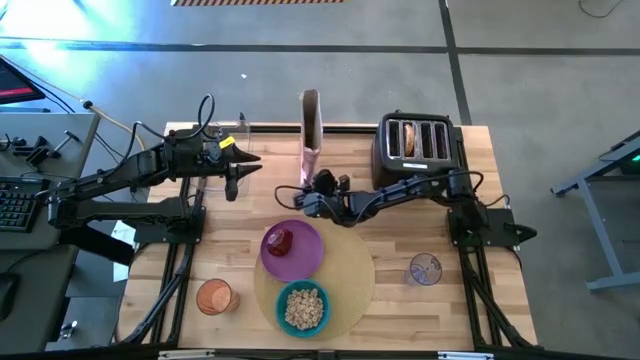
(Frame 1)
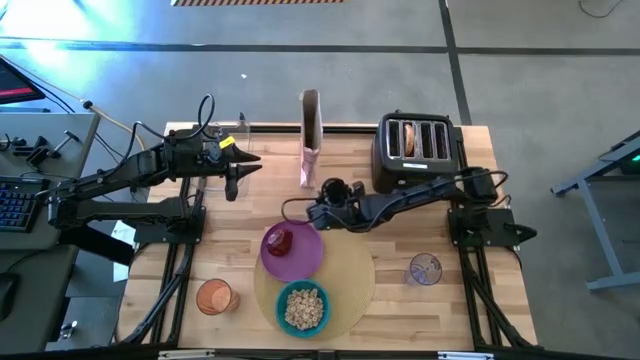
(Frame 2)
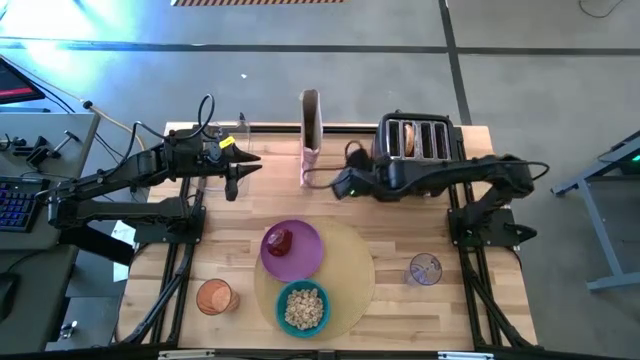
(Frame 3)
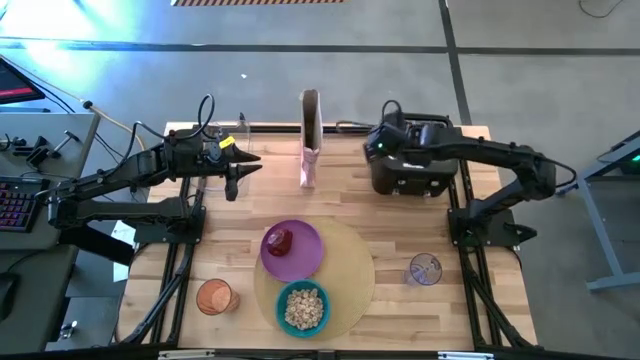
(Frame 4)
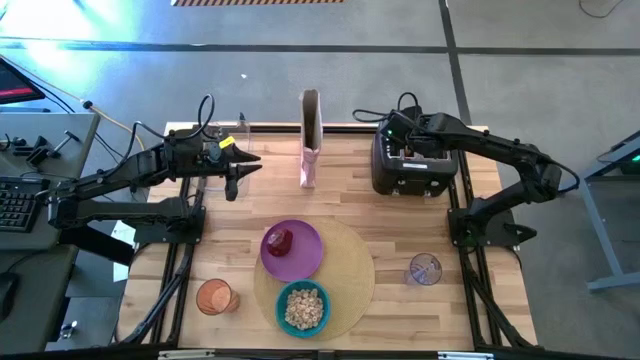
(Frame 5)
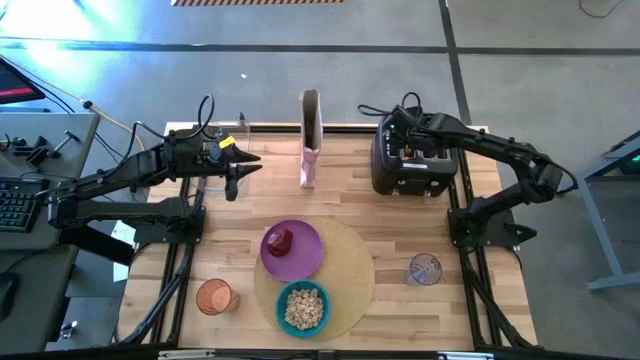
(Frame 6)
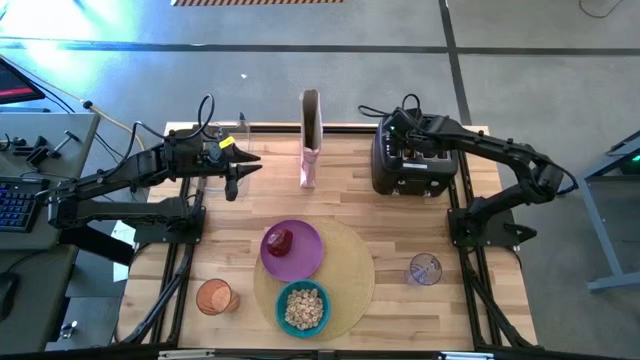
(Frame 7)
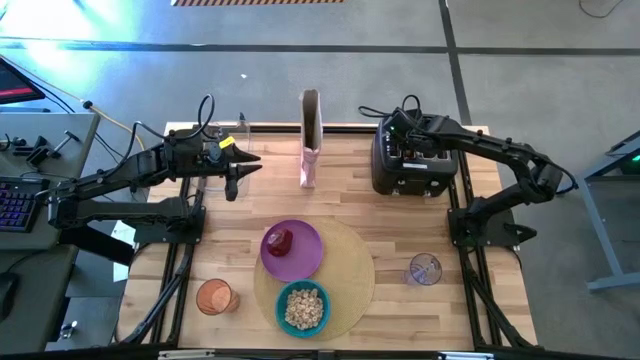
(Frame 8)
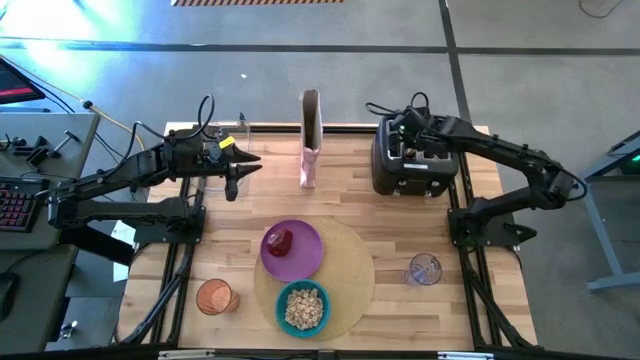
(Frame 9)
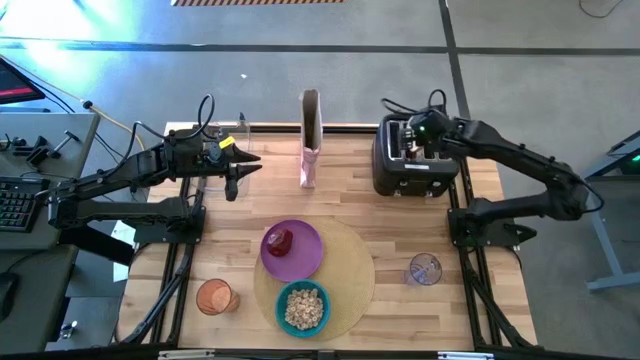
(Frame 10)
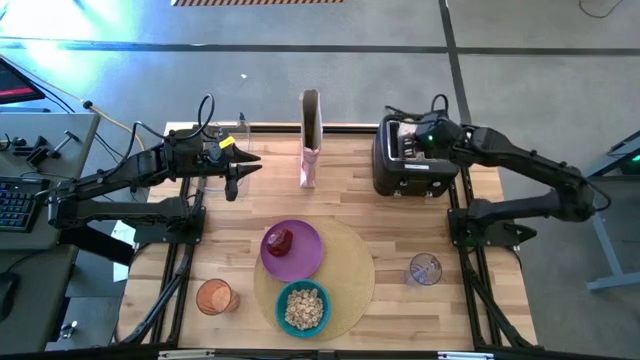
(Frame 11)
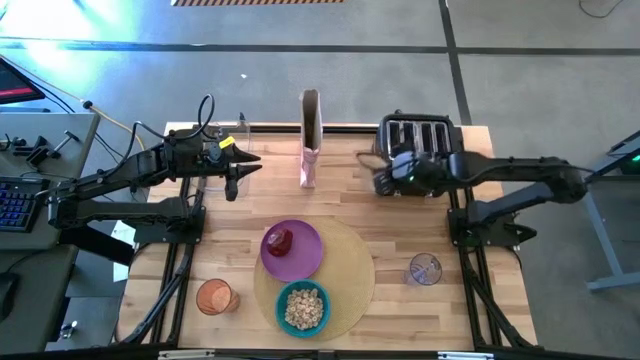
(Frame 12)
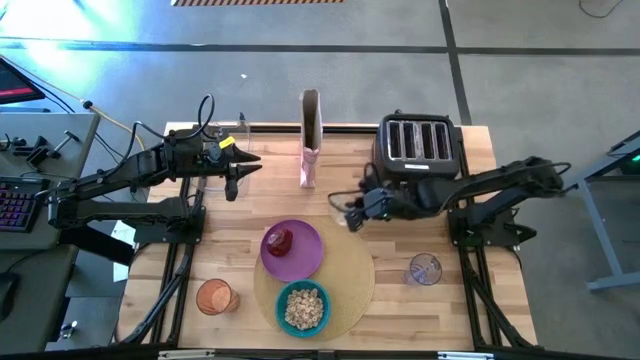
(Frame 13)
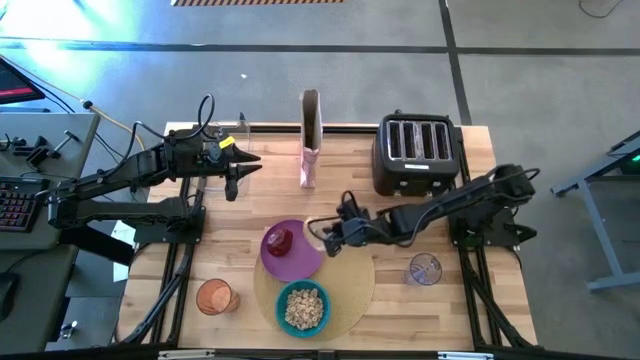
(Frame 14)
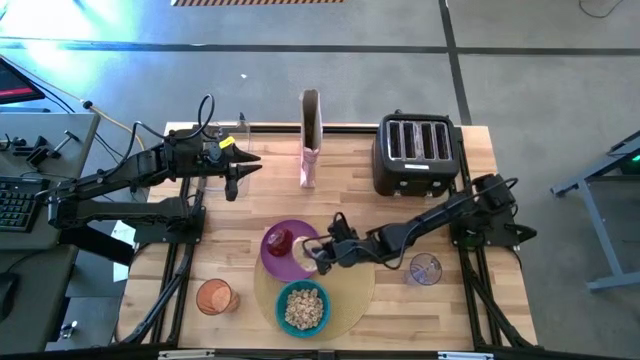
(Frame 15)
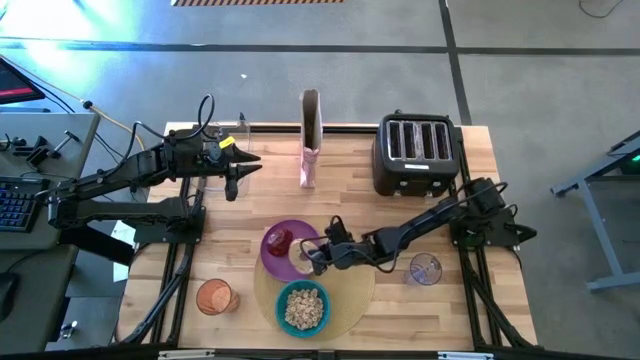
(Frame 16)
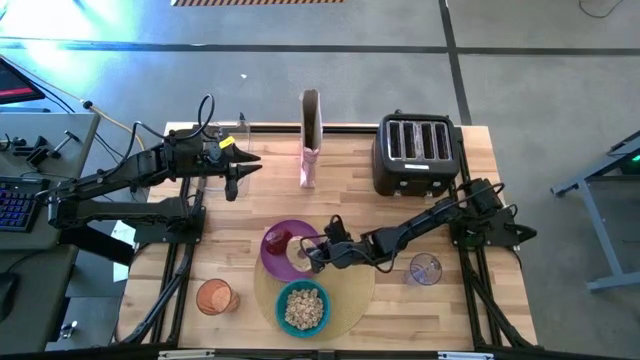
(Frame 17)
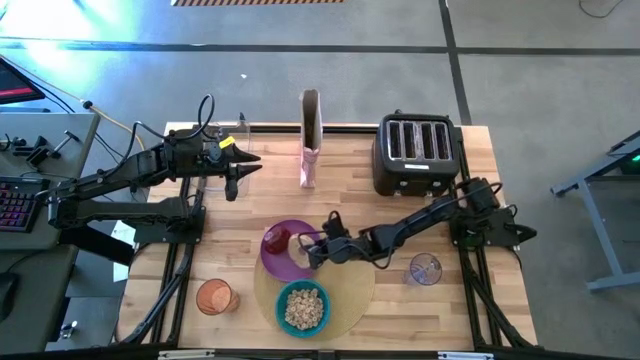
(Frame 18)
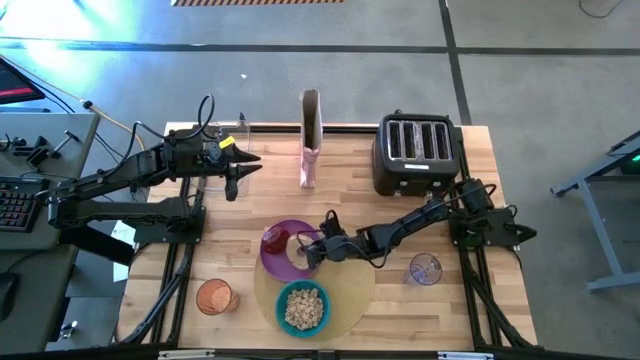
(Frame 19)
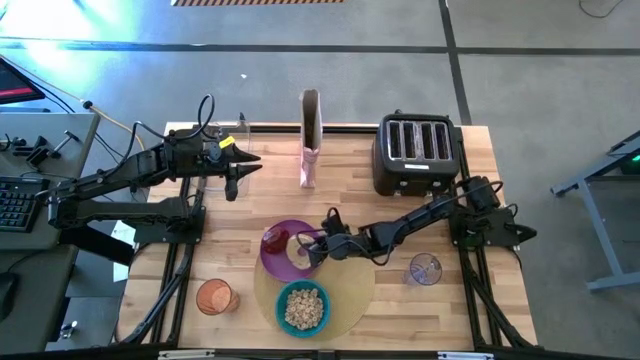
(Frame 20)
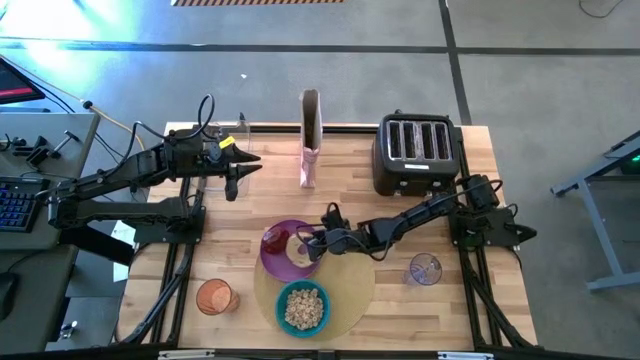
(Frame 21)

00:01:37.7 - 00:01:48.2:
Task: Arrange a breakfast setting
Put the brown bagel on the purple plate to the left of the red apple

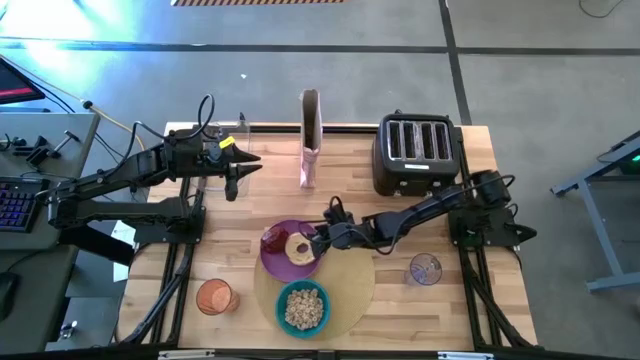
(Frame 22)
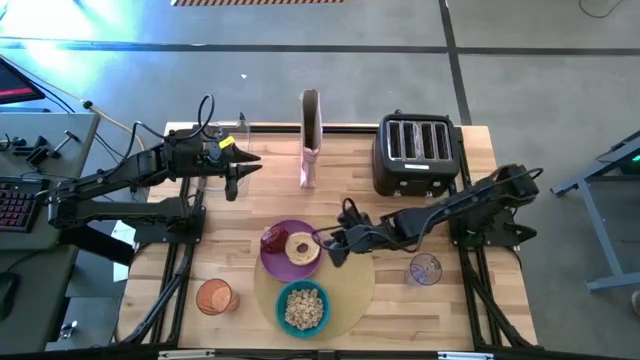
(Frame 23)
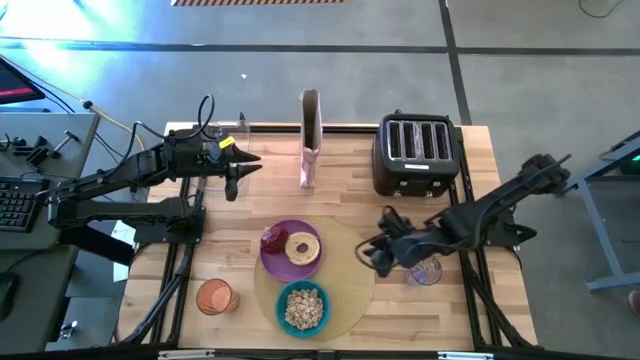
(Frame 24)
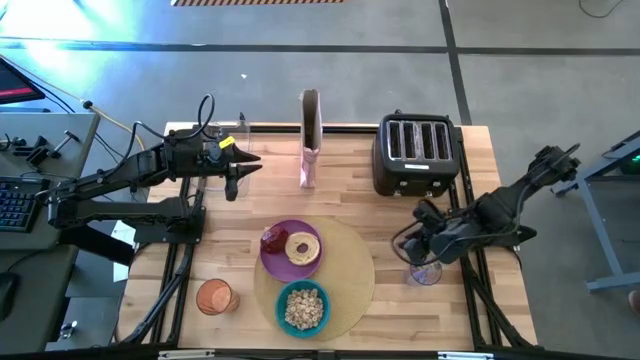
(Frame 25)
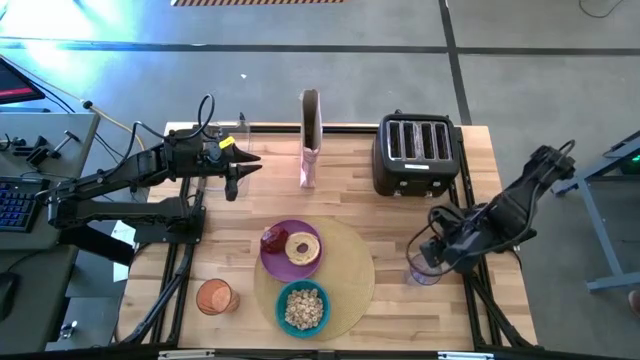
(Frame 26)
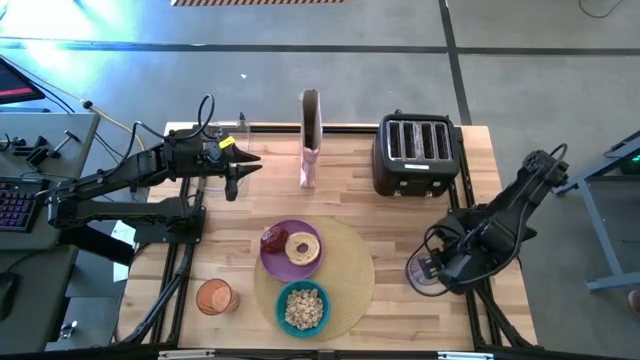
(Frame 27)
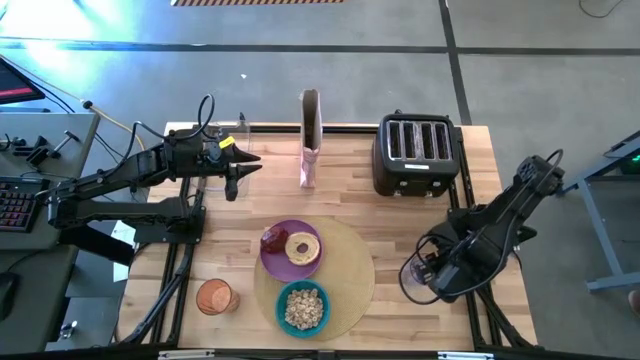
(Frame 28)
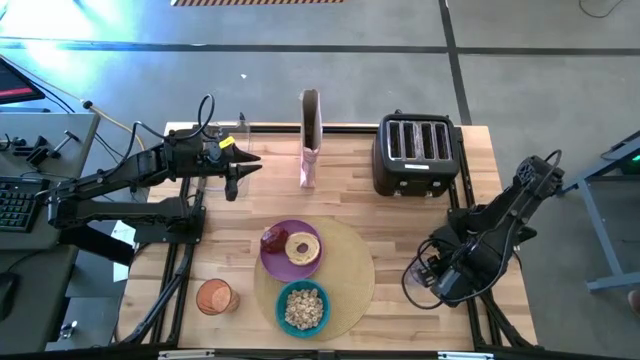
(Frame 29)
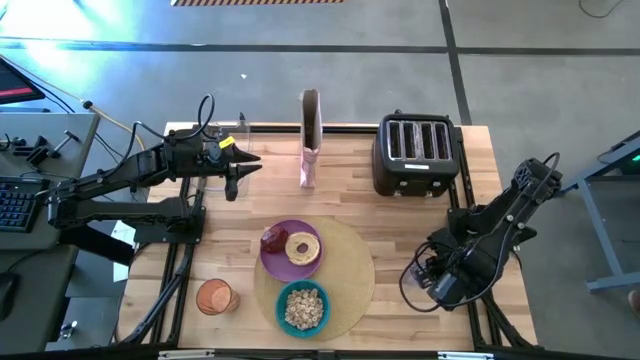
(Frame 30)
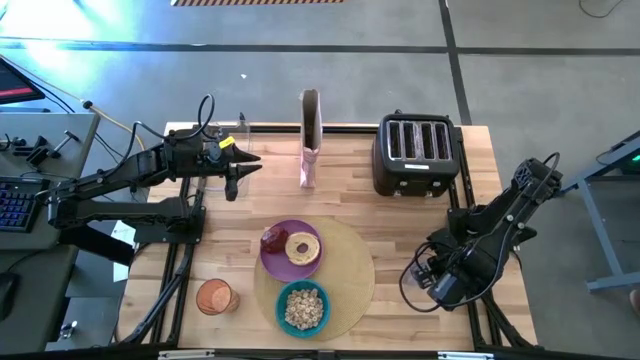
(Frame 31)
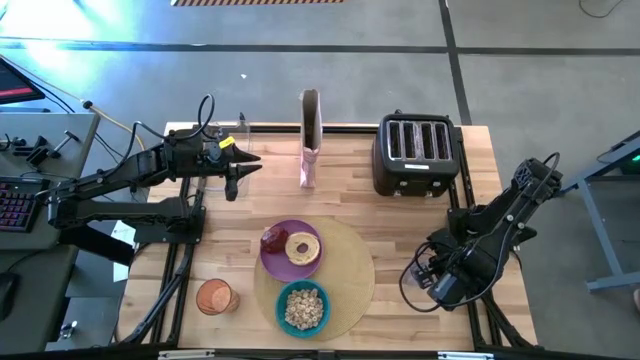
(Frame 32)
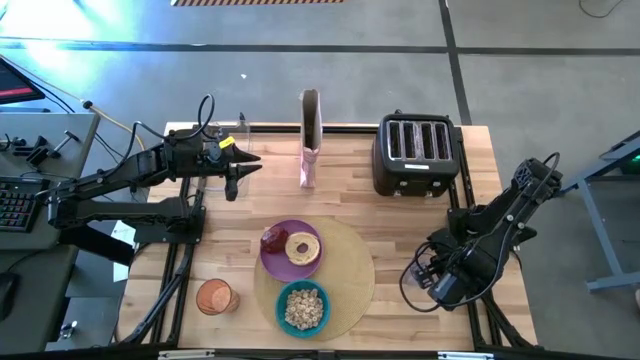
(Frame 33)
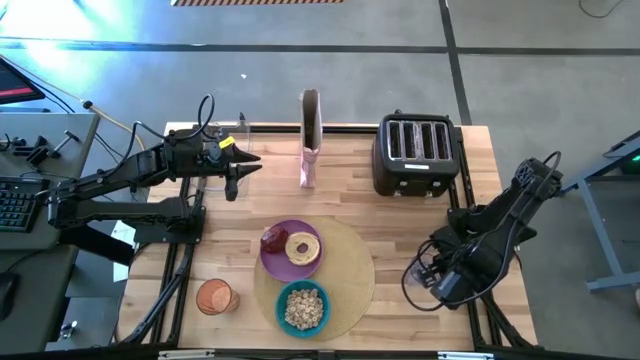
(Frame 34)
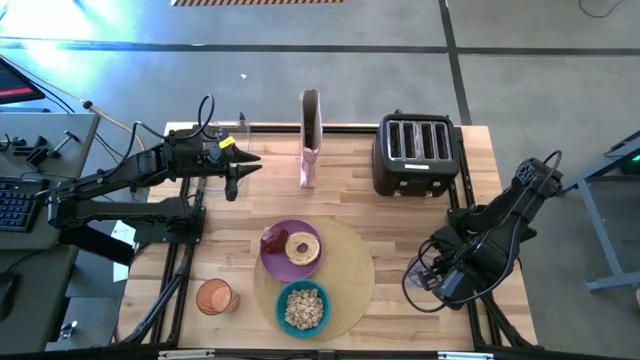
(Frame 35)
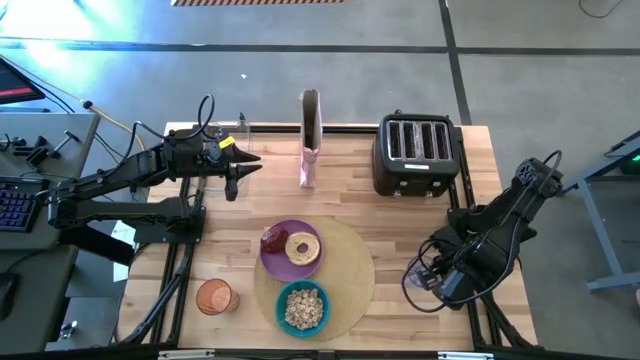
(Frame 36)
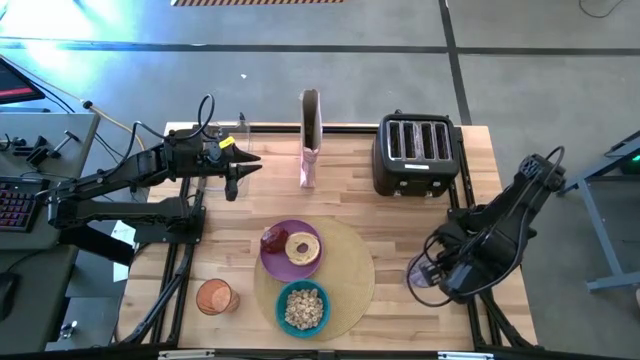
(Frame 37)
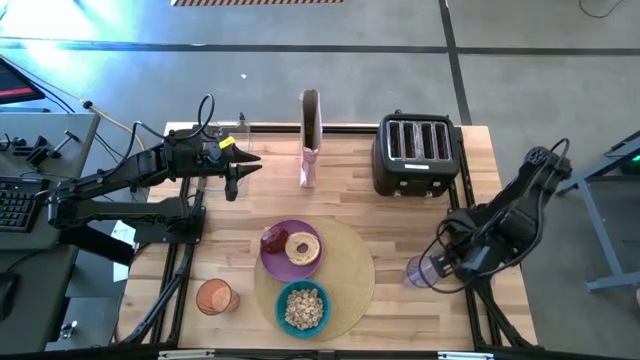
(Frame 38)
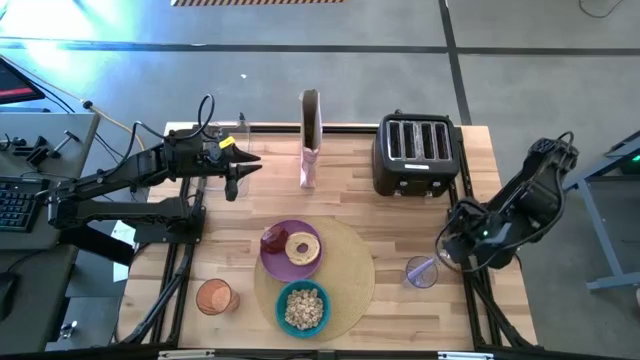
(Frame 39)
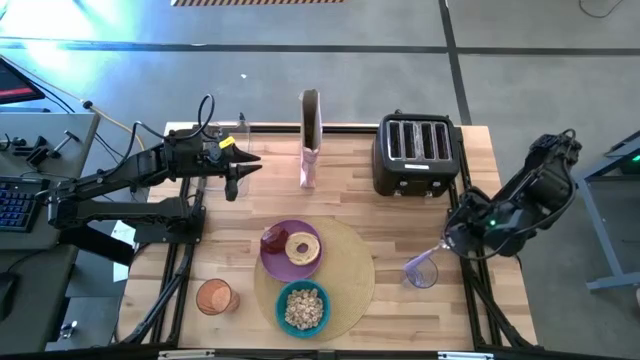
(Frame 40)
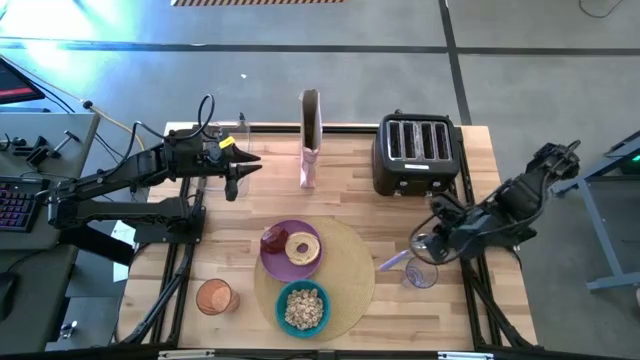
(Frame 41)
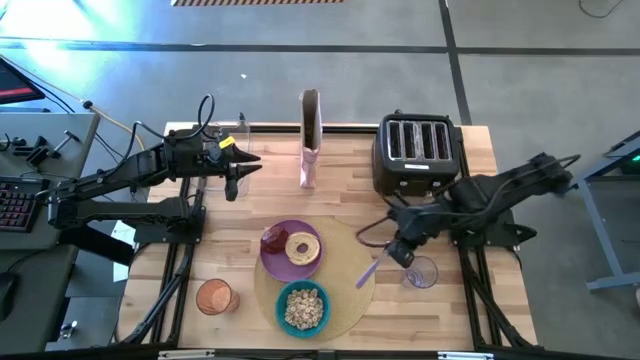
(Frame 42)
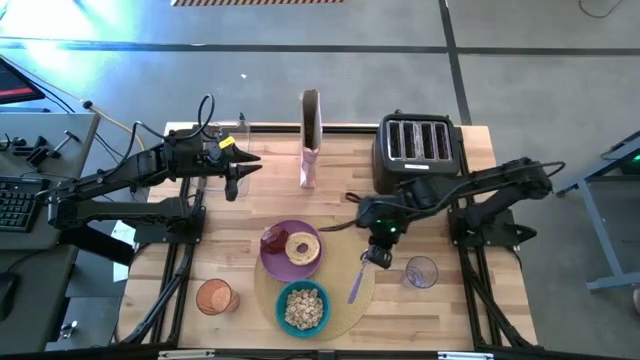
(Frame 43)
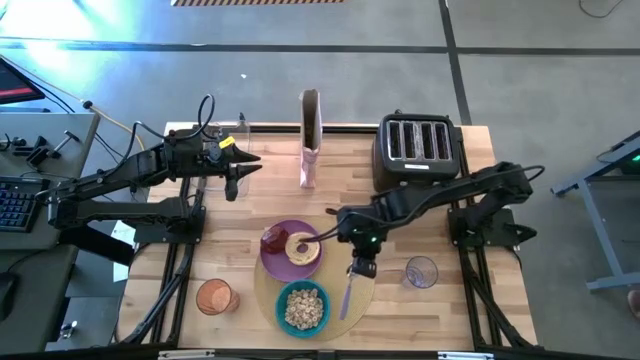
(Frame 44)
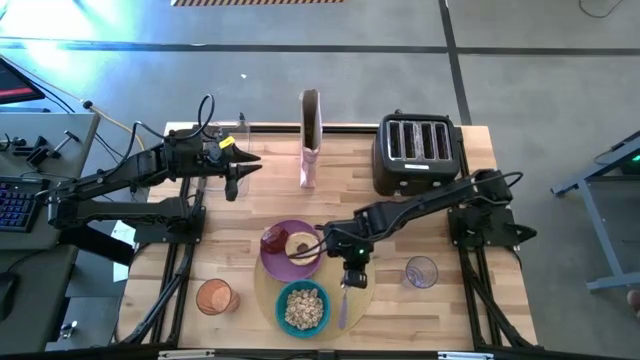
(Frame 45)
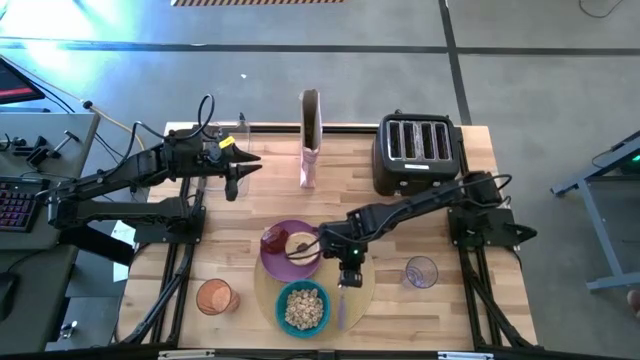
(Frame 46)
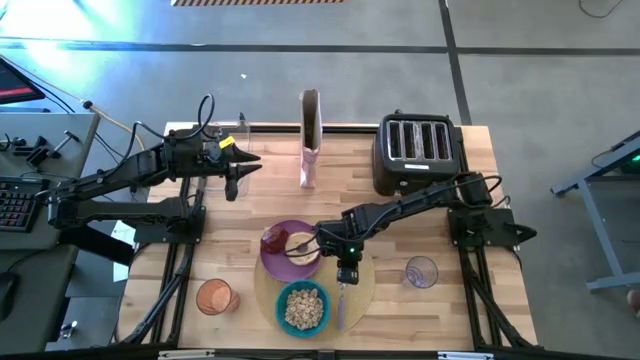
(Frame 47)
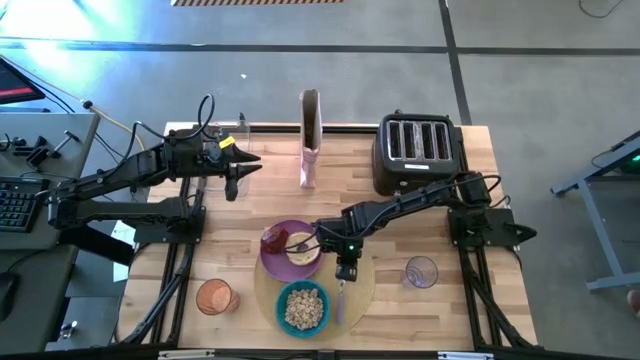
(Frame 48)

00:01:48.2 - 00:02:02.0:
Put the purple spoon on the brown placemat to the left of the blue bowl
